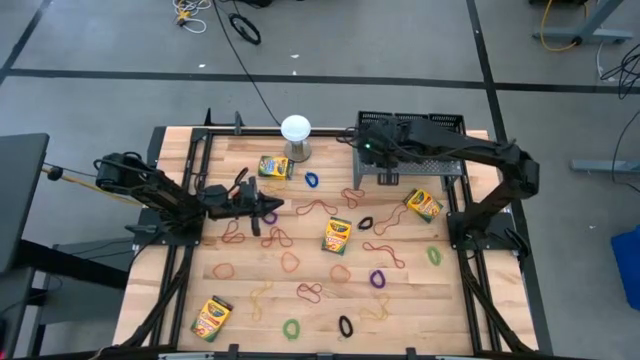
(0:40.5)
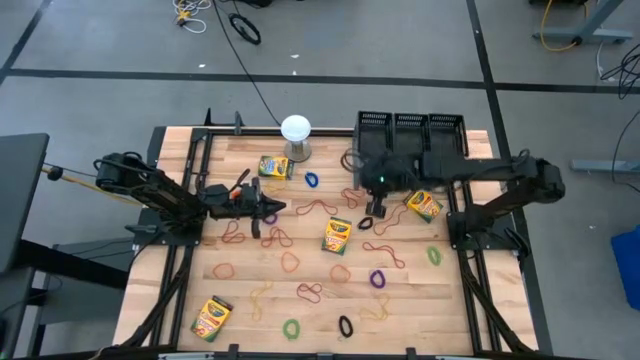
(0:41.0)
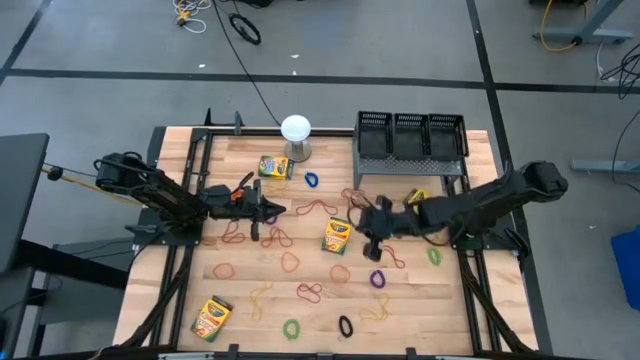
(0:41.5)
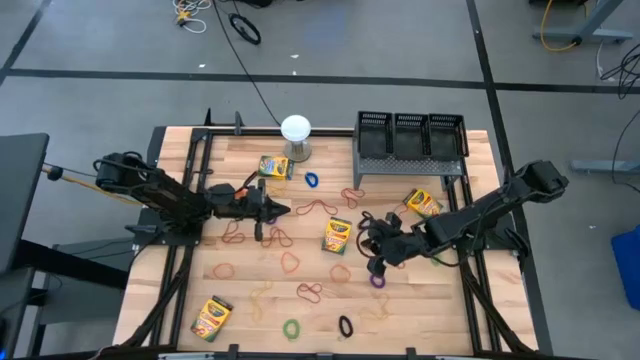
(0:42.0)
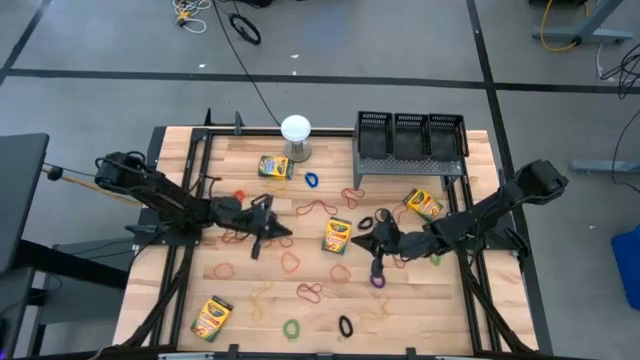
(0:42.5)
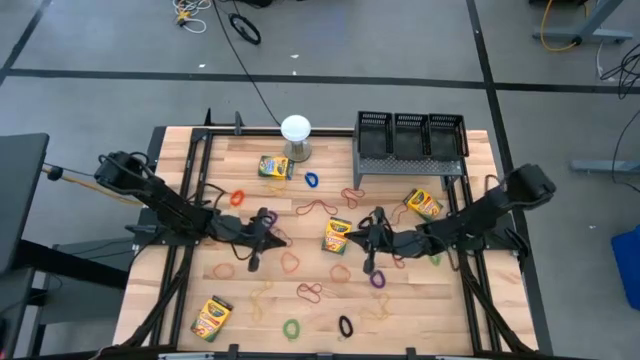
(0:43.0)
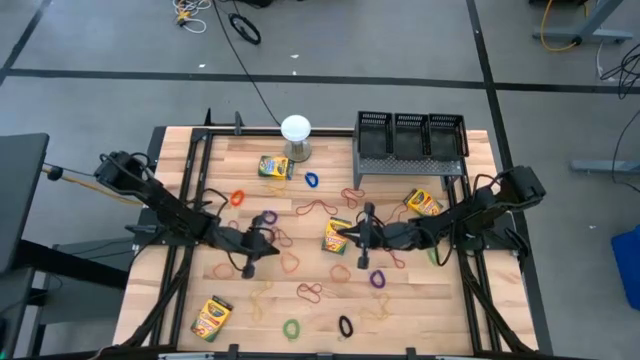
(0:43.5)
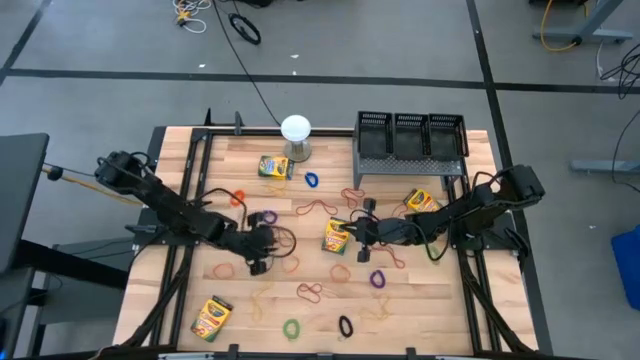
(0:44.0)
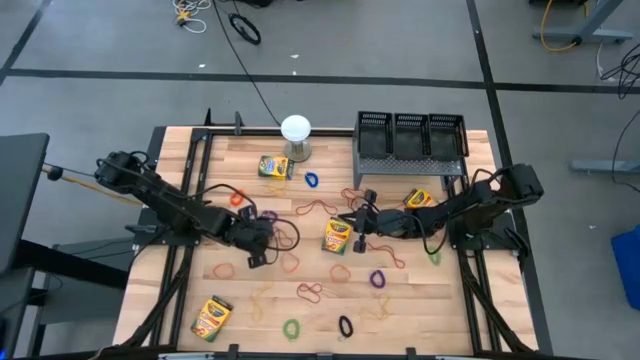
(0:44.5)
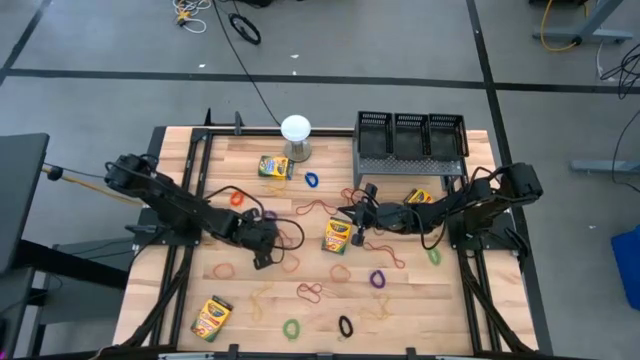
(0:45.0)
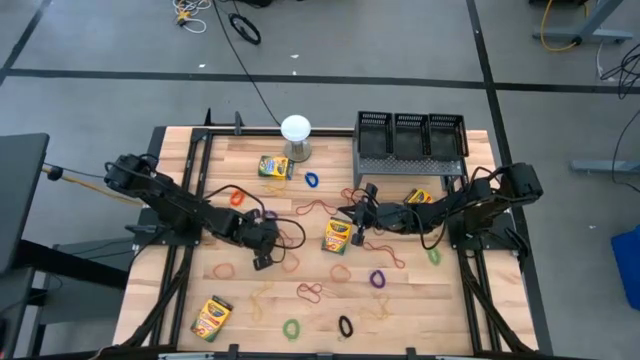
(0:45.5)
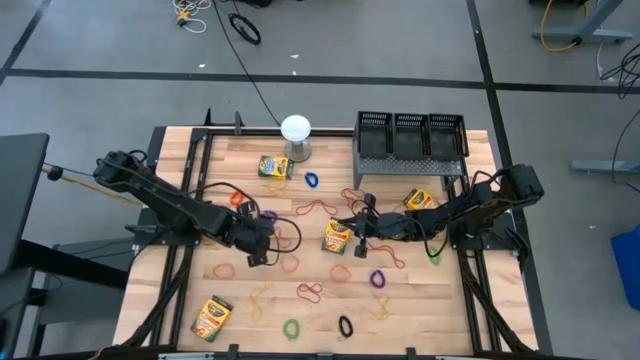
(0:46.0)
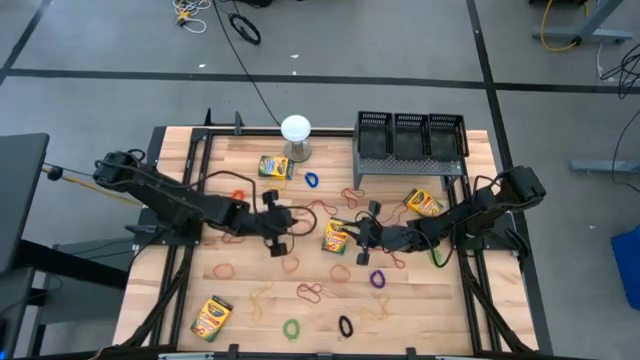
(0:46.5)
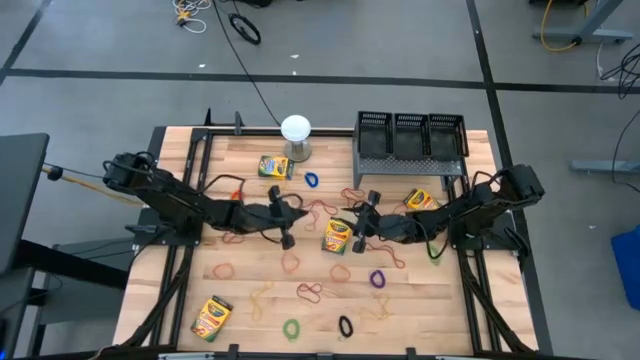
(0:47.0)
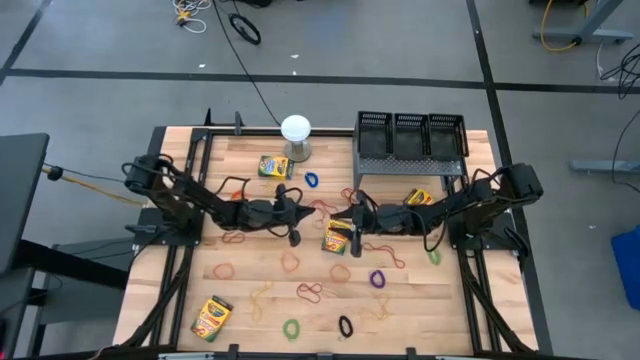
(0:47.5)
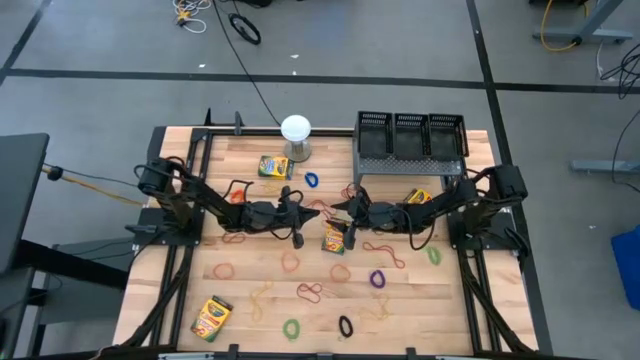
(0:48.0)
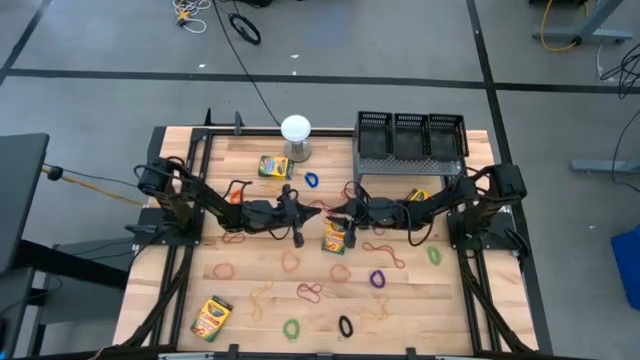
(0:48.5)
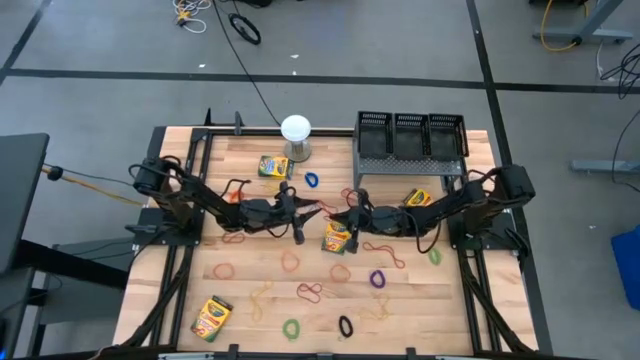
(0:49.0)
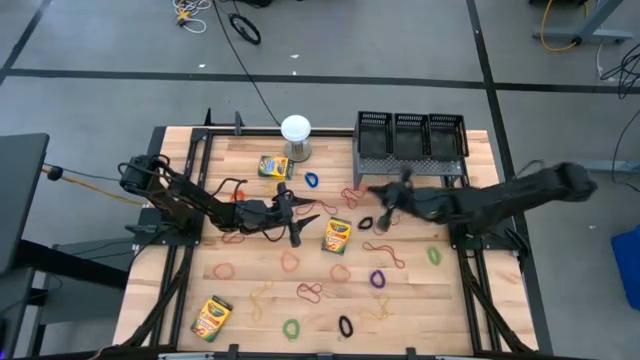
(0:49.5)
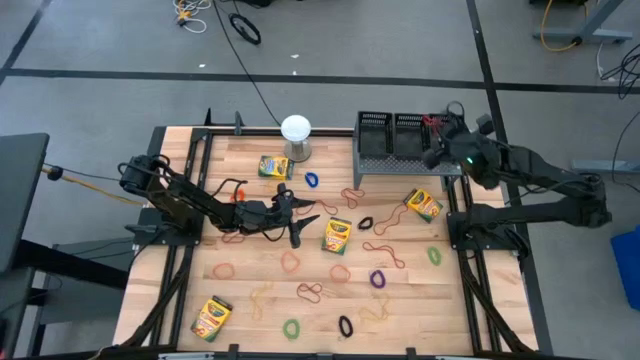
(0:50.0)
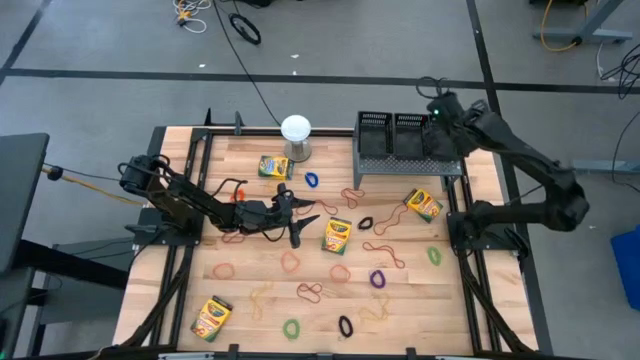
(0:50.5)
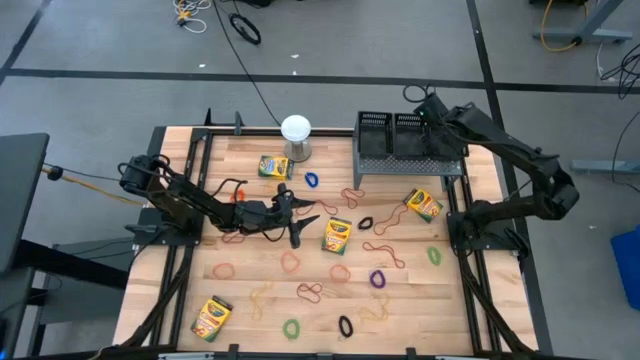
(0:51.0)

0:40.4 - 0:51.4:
Task: Pick & Place Office Desk Supplies
Put the red rubberband into the right black basket on the shelf

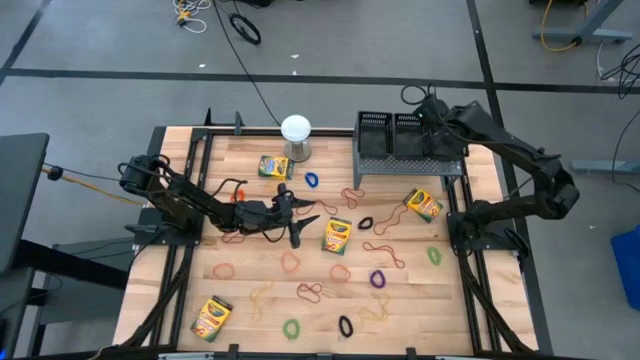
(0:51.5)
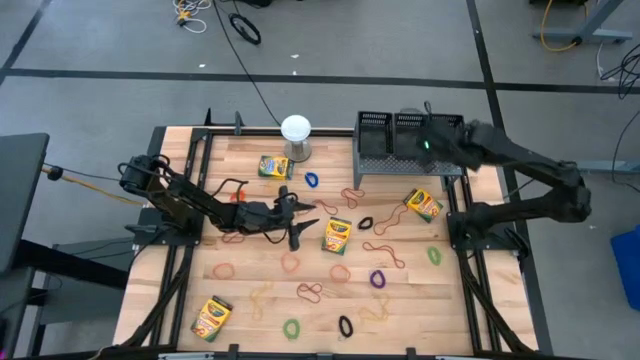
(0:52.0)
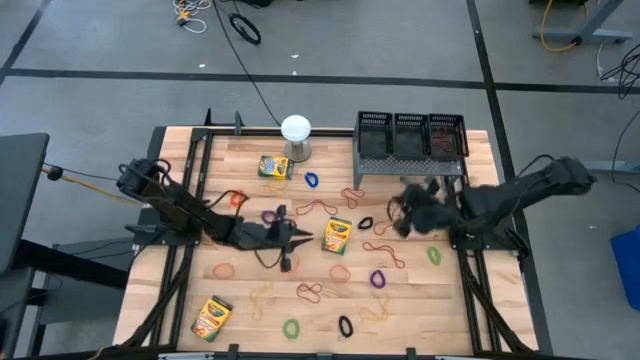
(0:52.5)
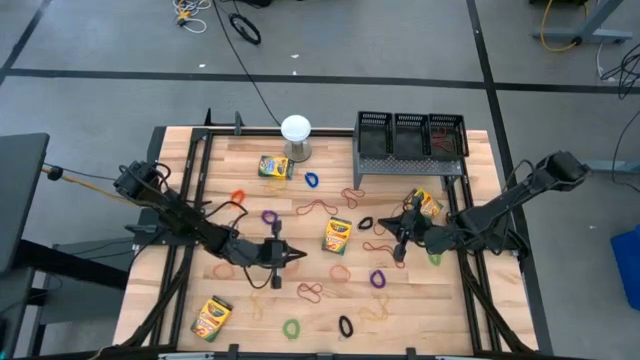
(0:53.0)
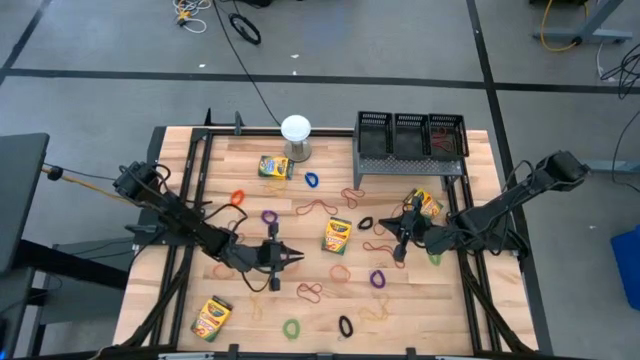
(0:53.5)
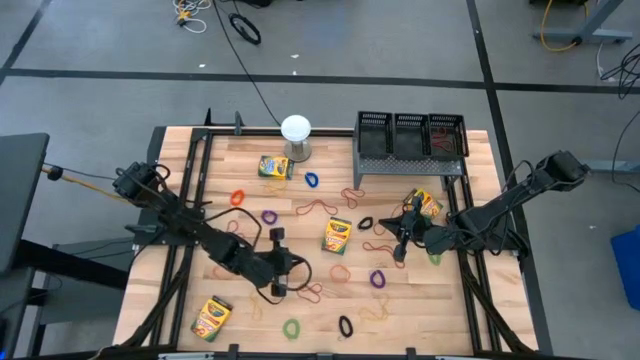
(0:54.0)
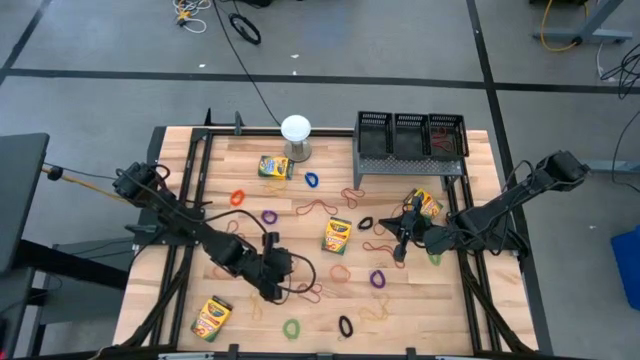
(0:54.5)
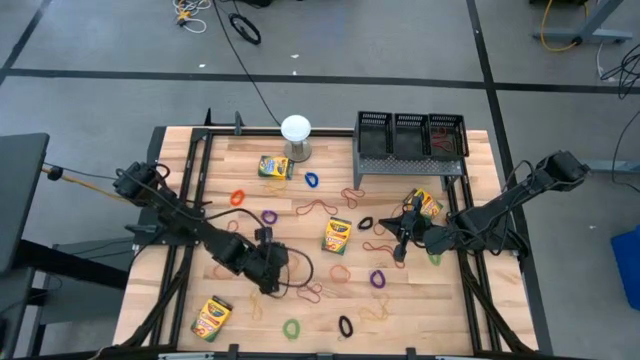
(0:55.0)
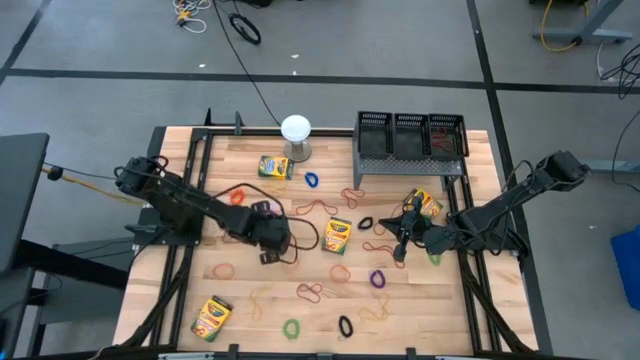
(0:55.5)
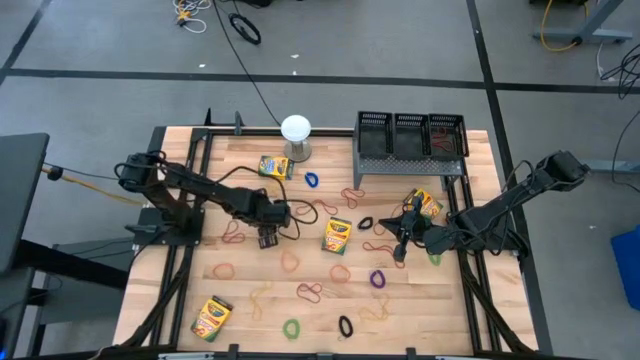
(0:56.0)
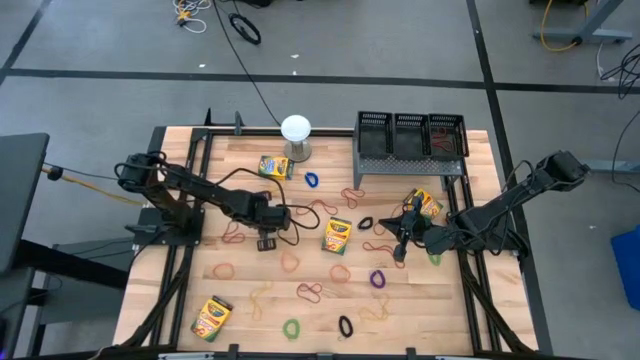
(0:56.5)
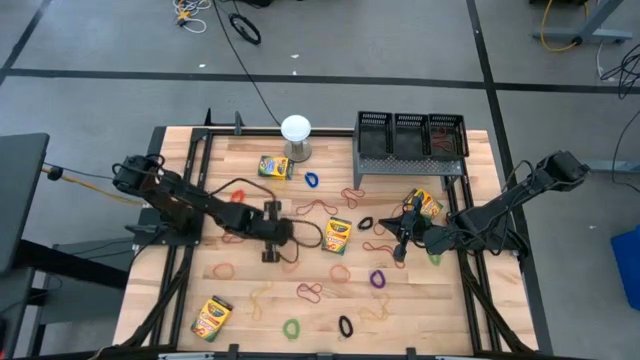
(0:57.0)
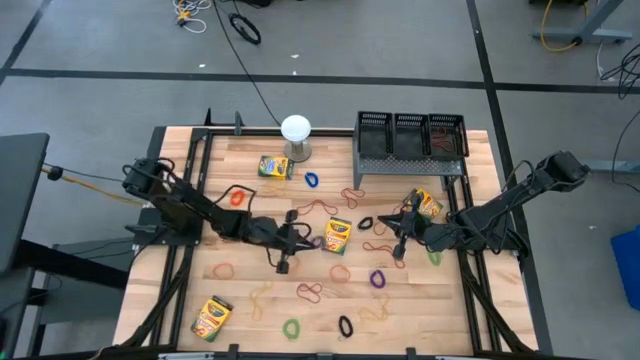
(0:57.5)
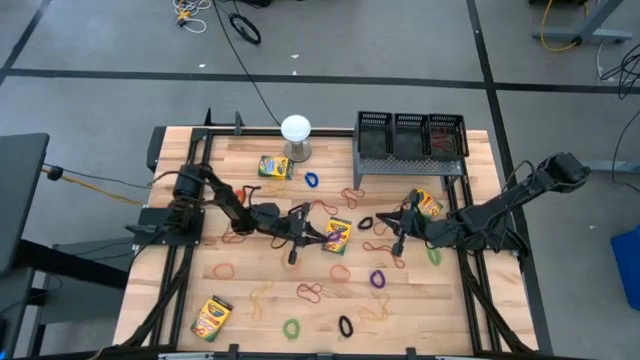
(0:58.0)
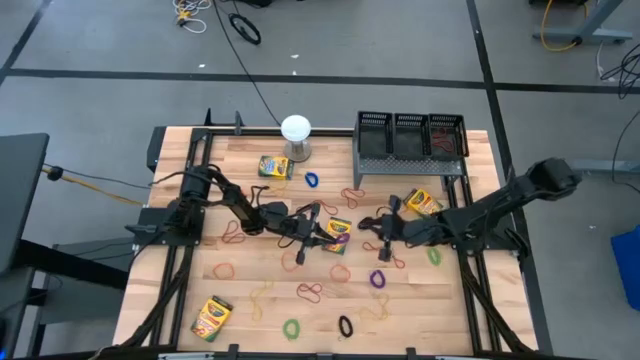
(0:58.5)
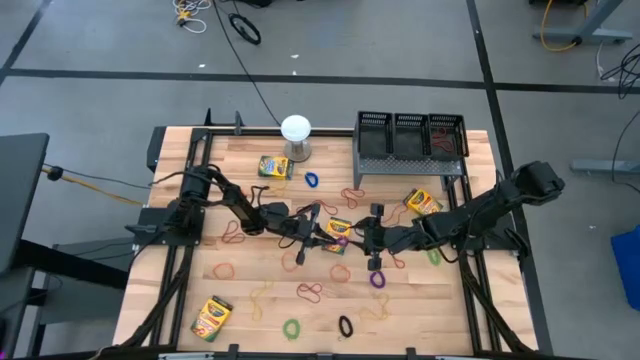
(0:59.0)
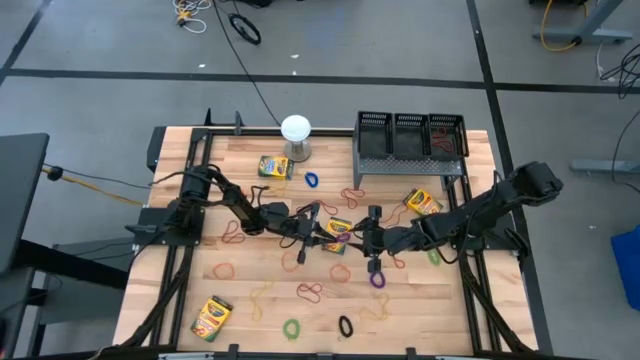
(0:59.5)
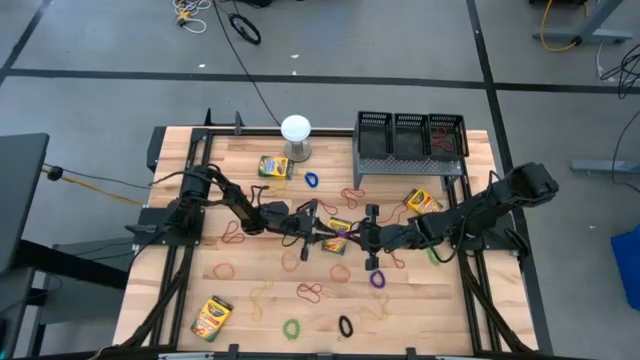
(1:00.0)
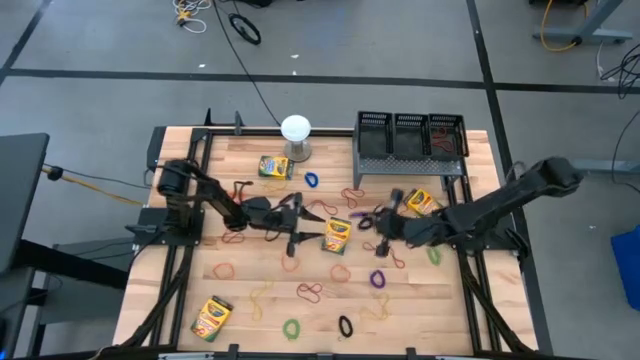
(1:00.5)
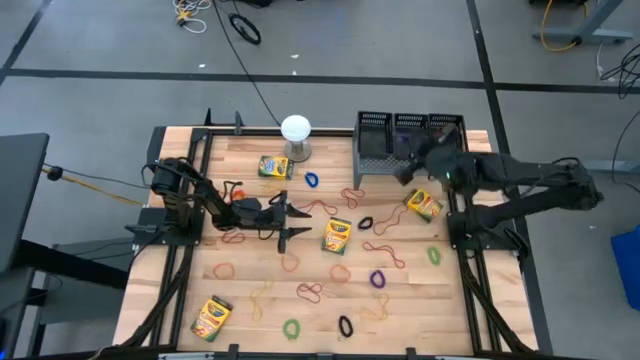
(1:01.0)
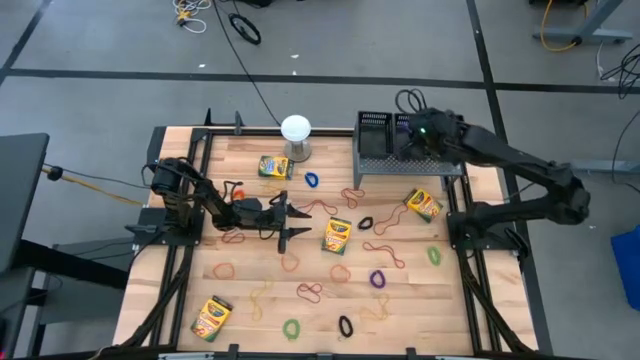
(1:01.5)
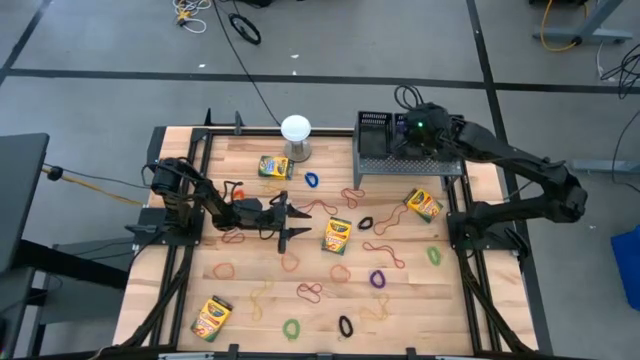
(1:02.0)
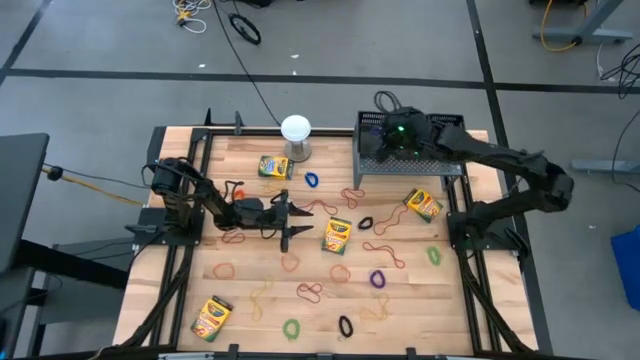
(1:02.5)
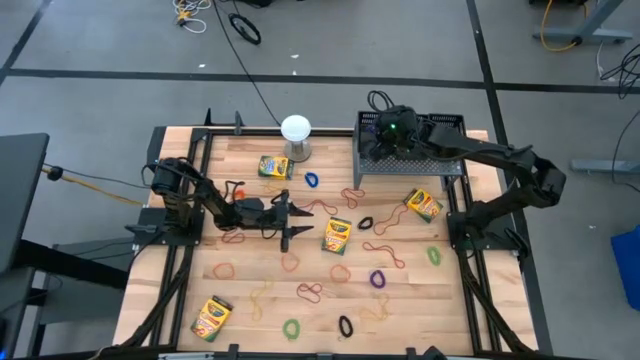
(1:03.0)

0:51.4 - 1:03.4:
Put the violet spring keychain into the left black basket on the shelf
